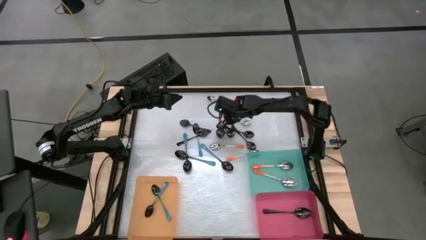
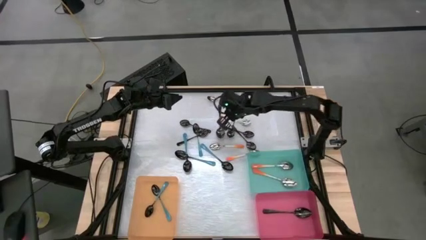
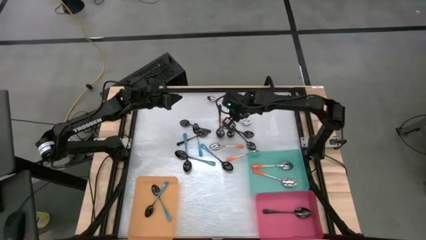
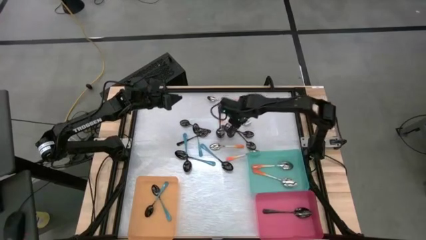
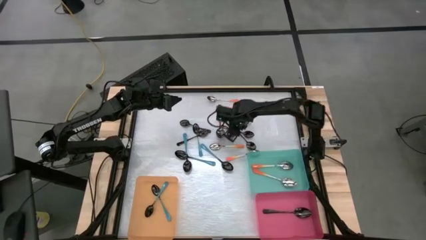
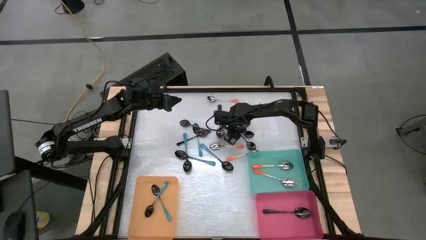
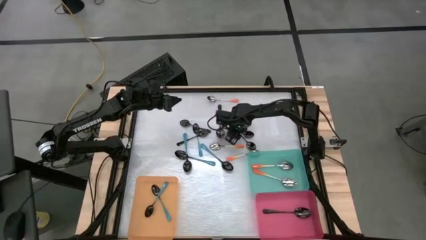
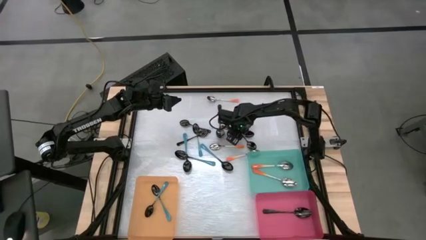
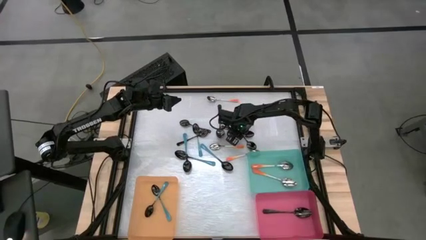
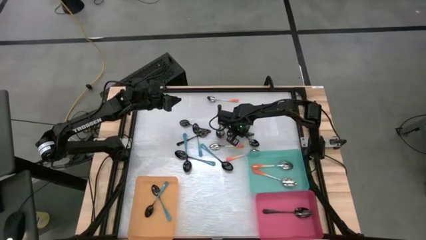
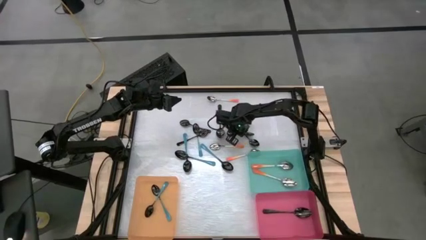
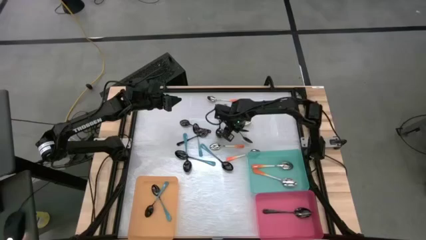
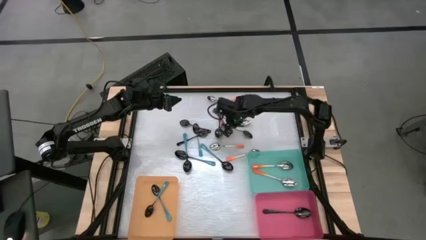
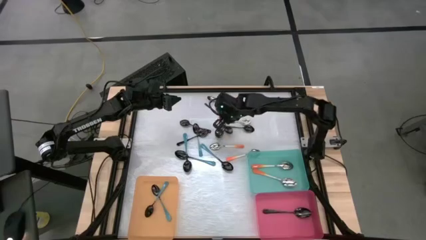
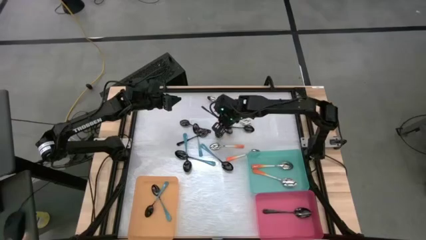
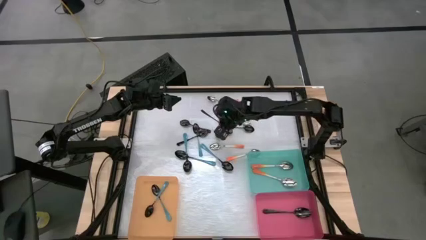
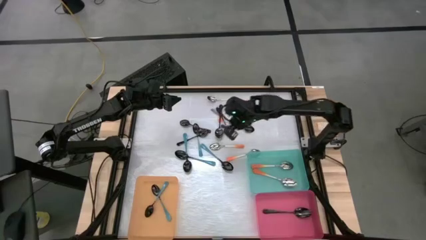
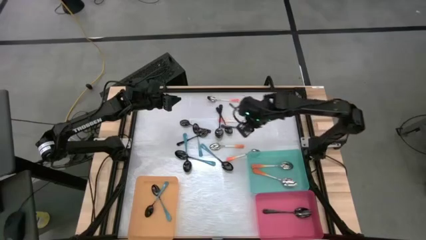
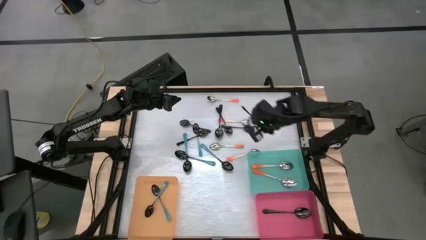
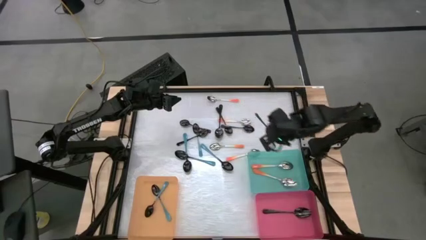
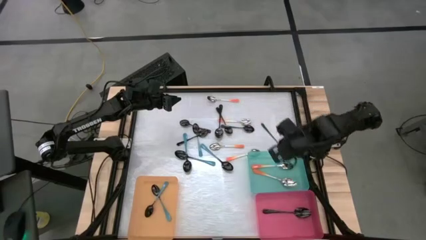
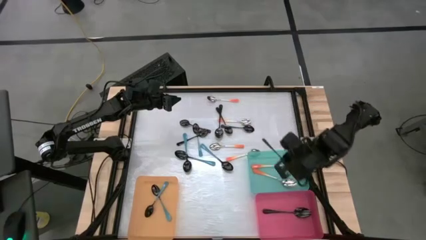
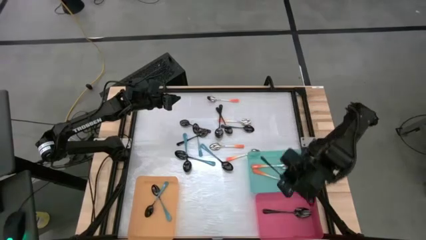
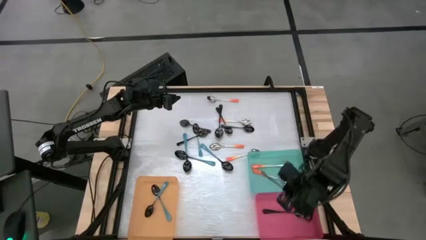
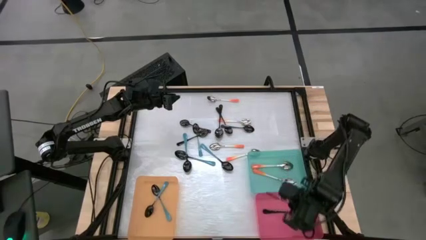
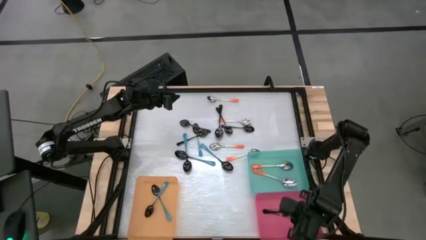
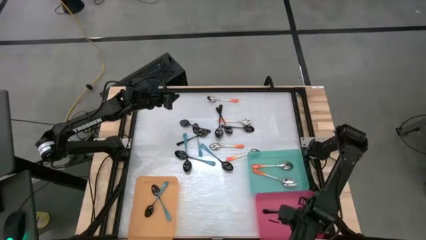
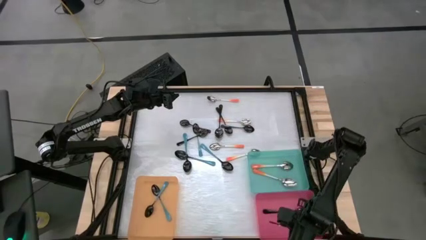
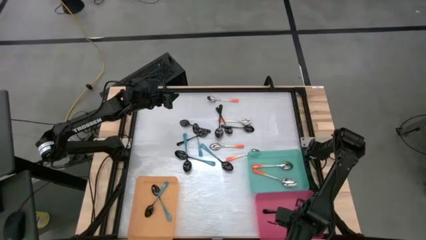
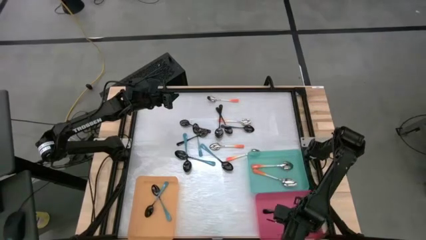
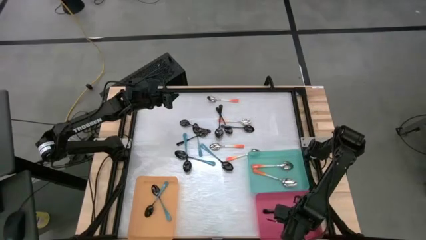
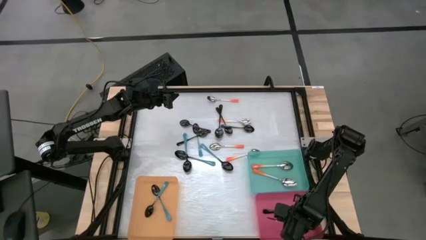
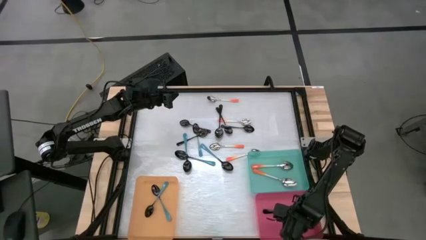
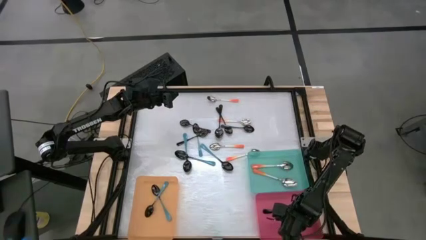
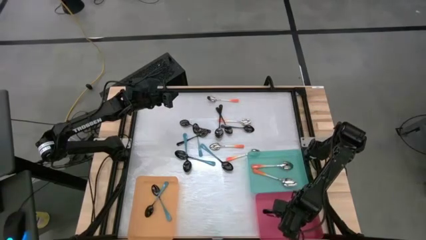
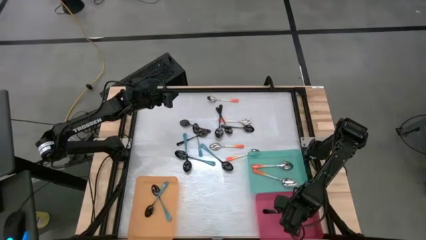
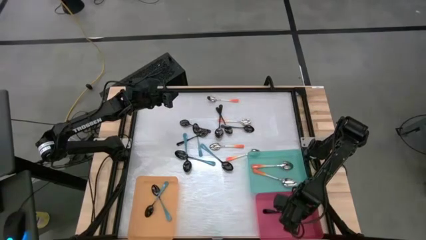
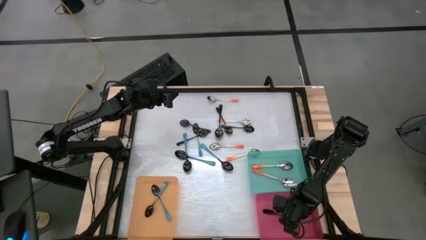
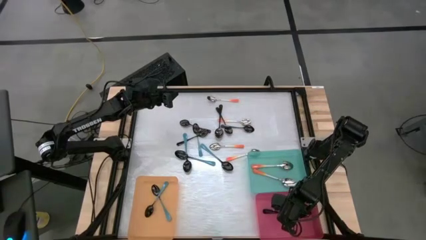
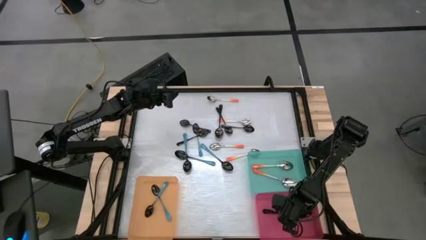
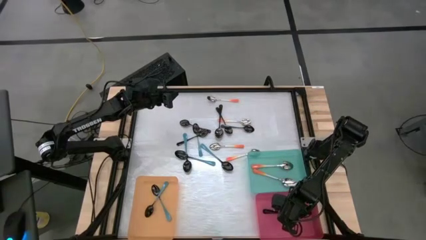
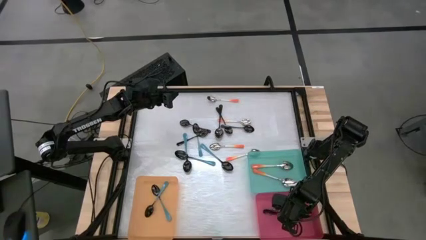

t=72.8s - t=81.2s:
Task: Sort silverware by color (type)
Put the black spoon into the pink bin

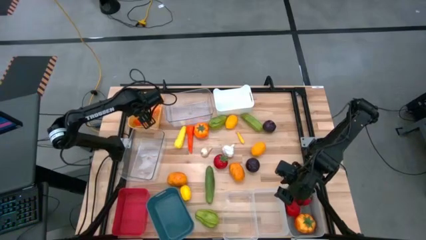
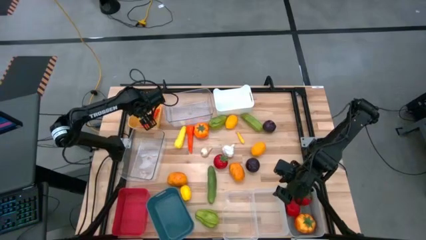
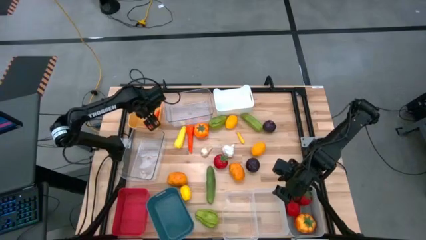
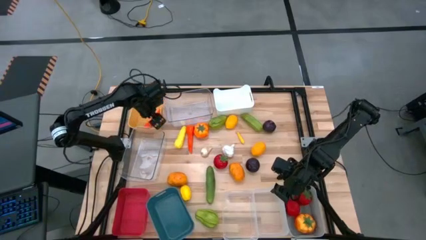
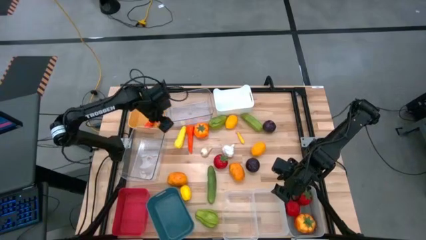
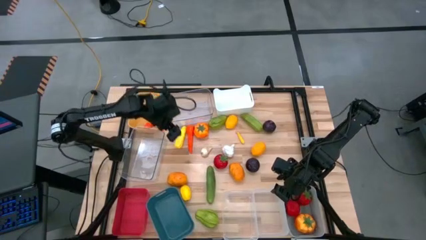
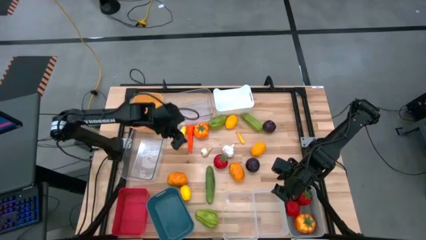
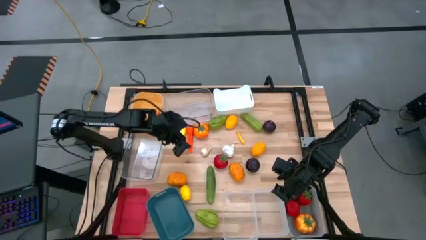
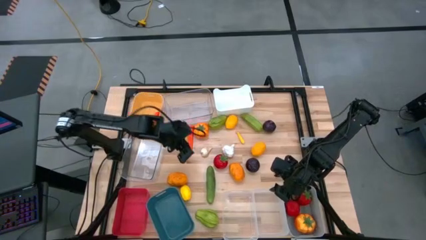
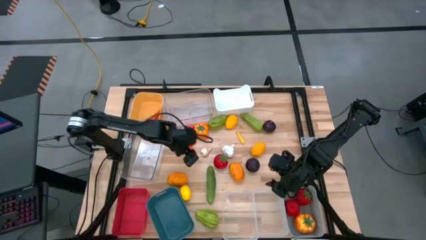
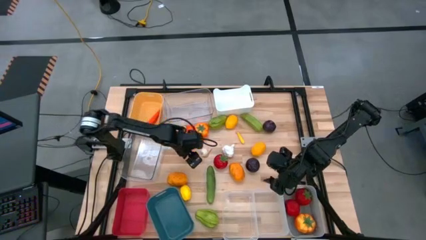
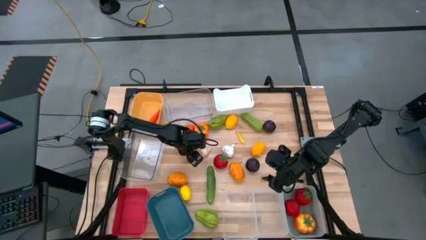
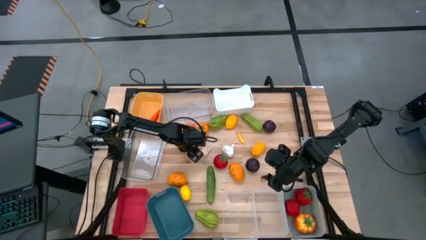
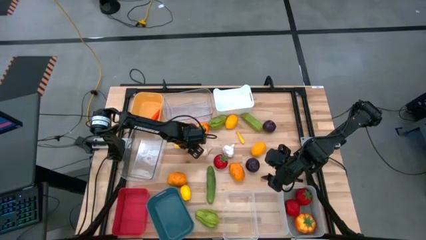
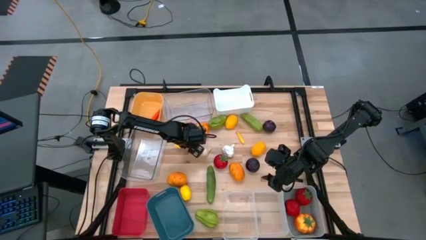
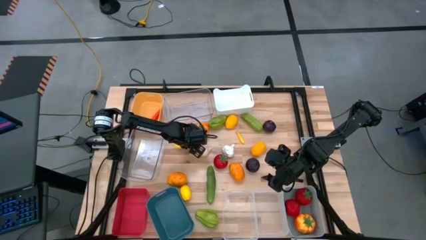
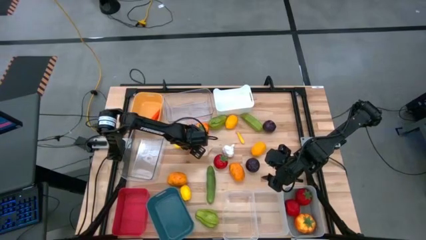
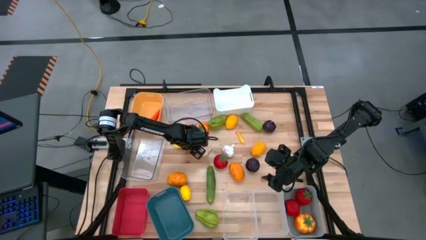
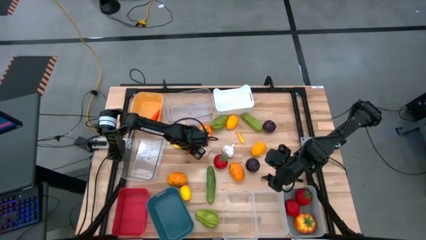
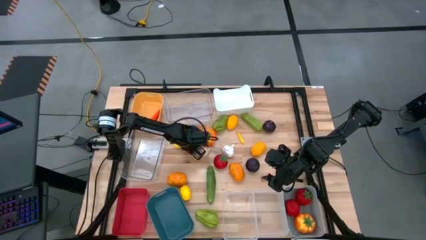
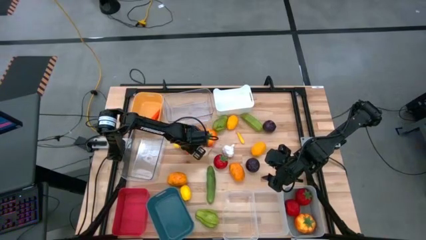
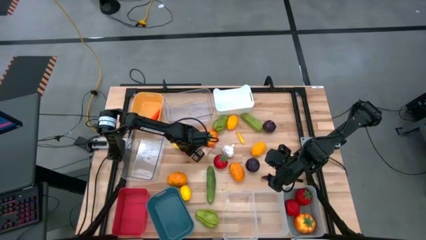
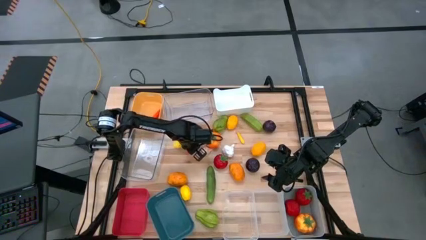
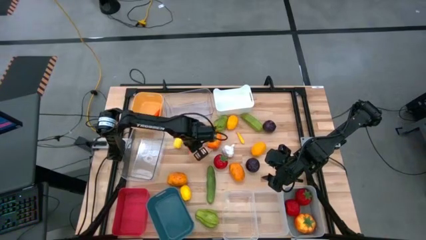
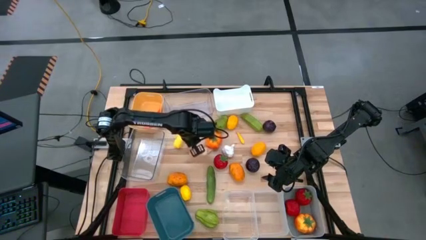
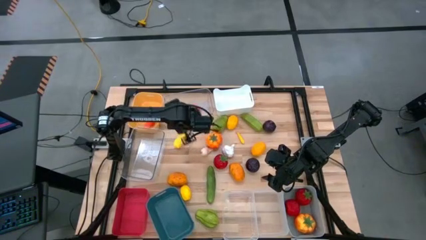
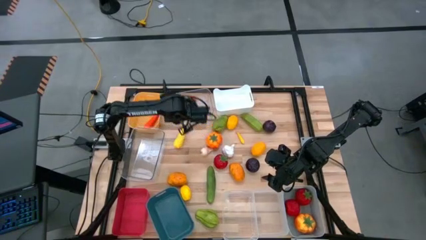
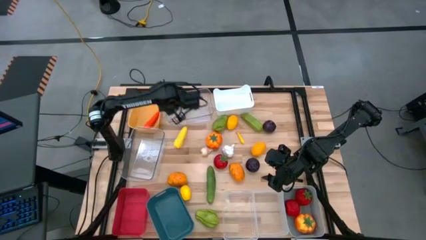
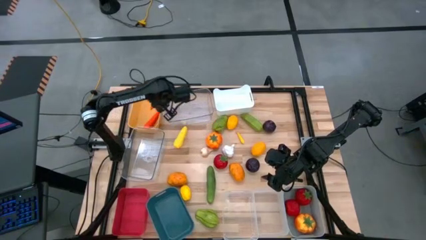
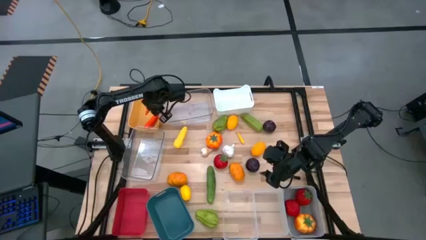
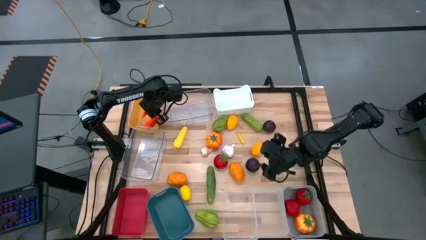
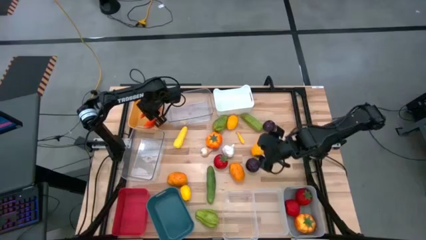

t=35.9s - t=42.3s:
Task: Sort produce into baskets
Put the orange carrot into the yellow bin

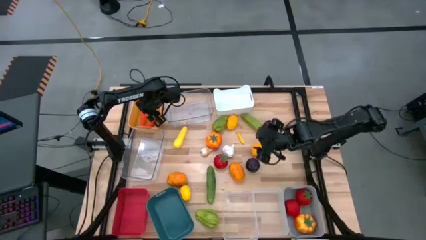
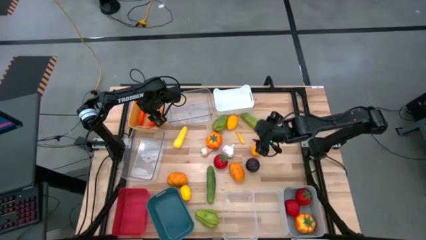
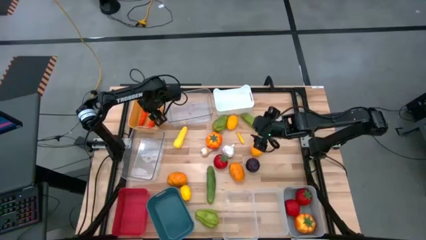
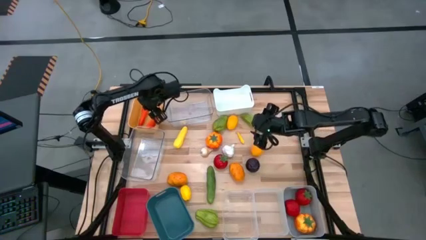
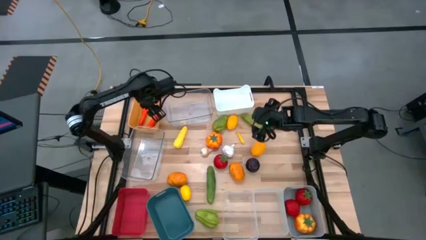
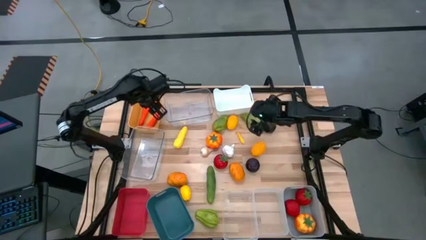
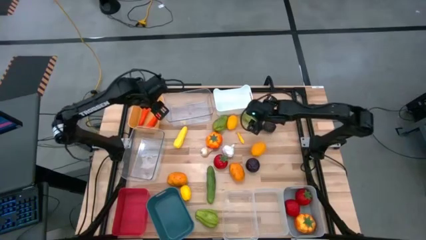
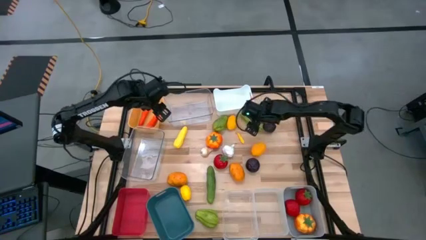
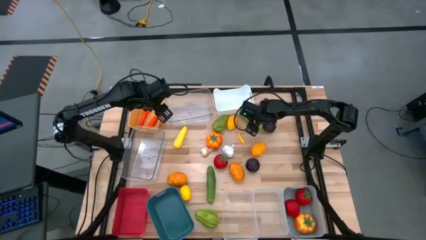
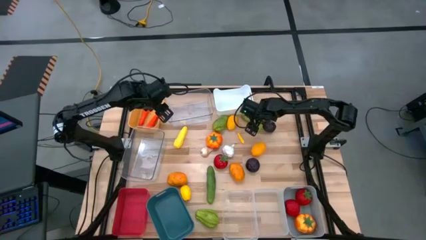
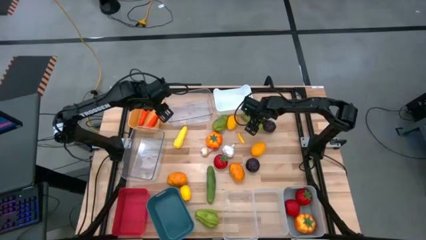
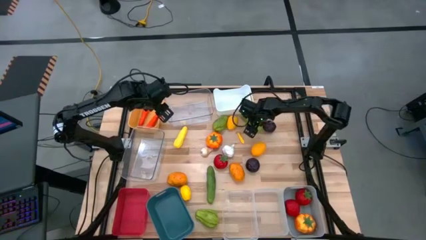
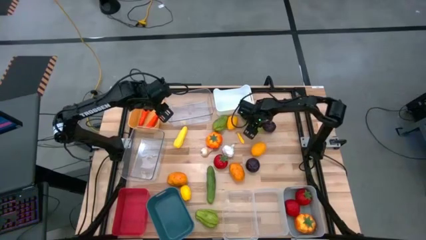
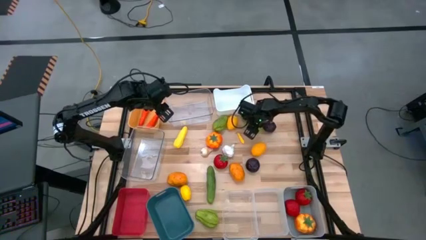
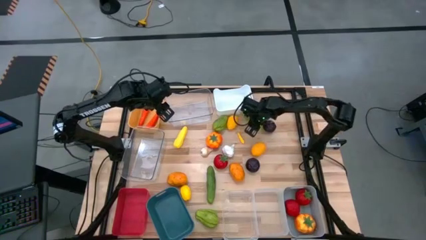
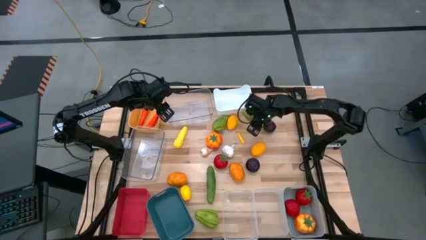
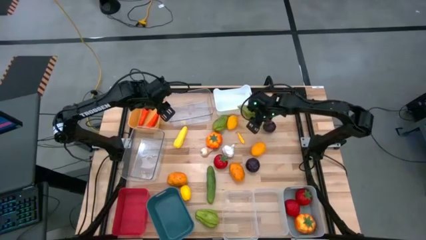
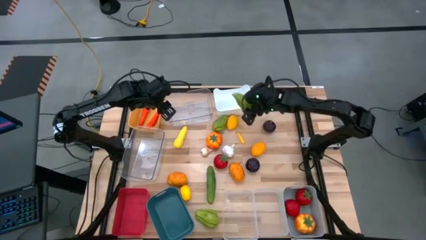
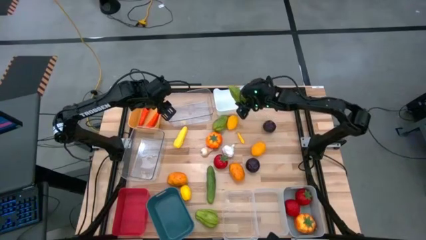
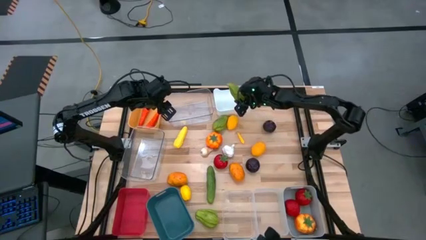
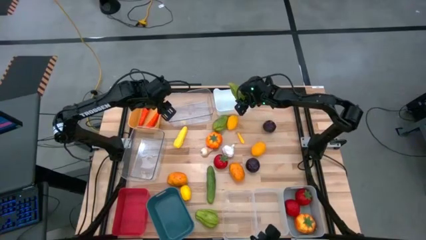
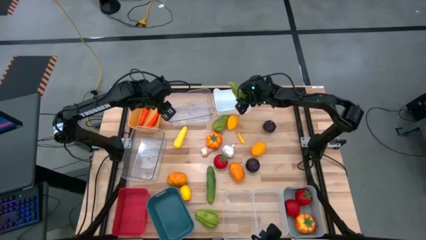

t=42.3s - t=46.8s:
Put the top green cucumber into the white bin
